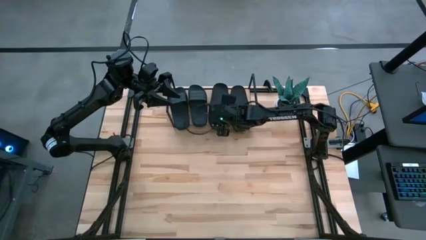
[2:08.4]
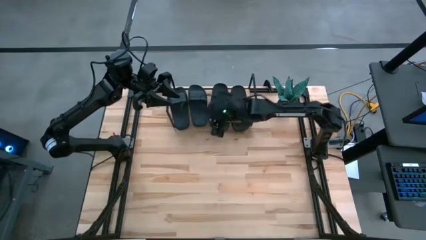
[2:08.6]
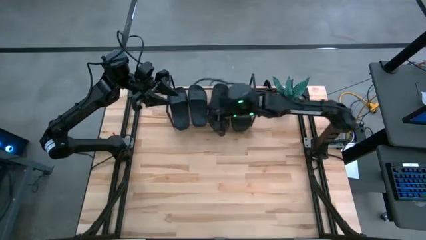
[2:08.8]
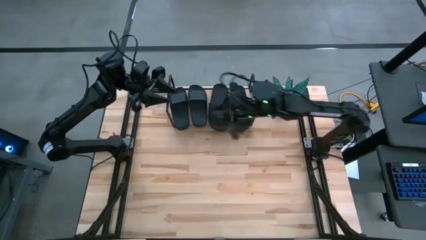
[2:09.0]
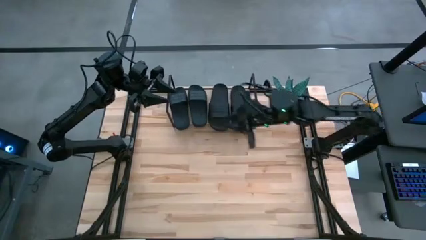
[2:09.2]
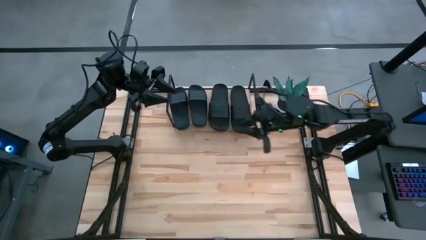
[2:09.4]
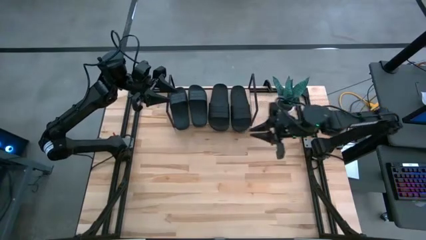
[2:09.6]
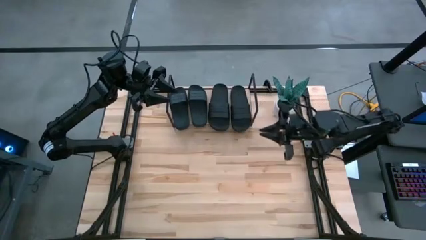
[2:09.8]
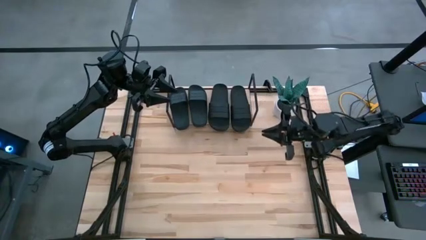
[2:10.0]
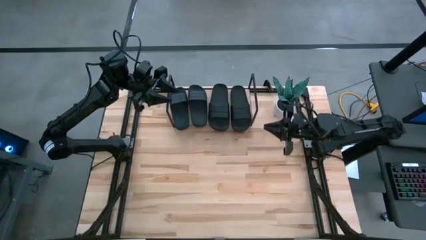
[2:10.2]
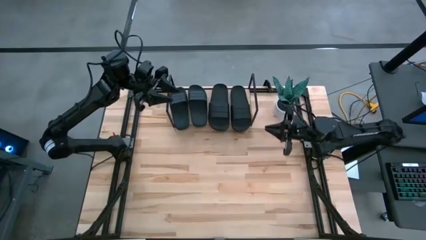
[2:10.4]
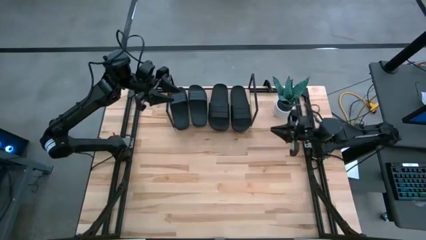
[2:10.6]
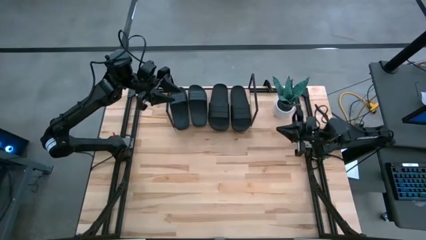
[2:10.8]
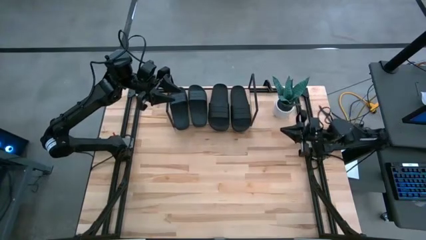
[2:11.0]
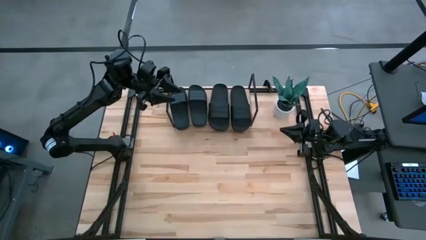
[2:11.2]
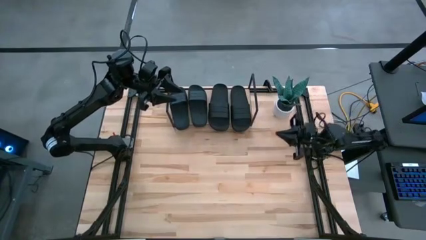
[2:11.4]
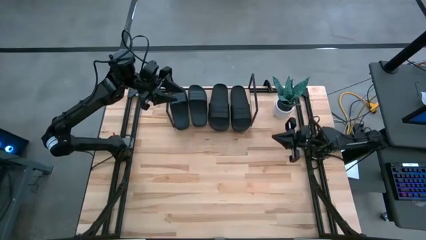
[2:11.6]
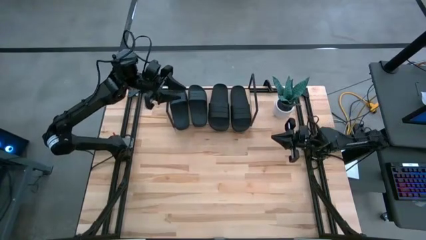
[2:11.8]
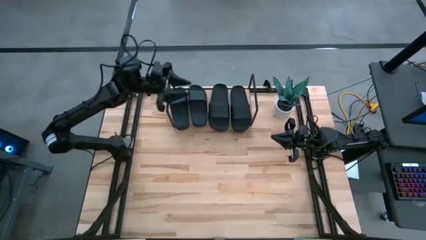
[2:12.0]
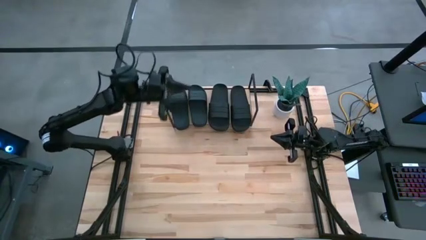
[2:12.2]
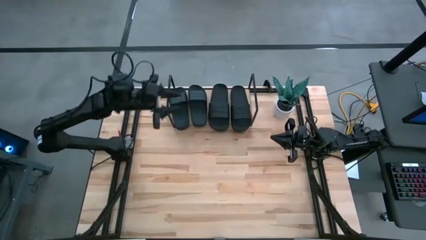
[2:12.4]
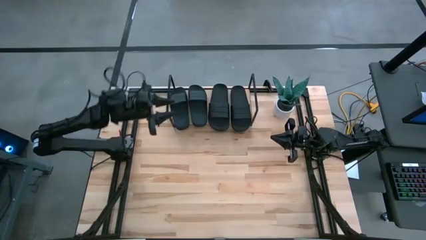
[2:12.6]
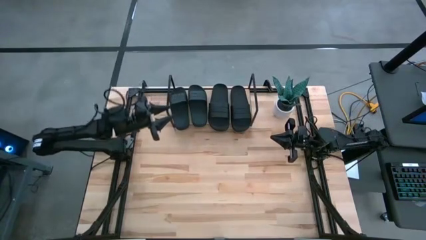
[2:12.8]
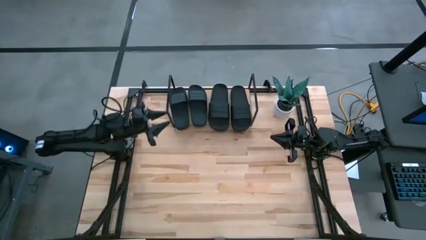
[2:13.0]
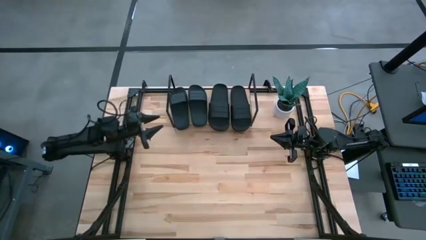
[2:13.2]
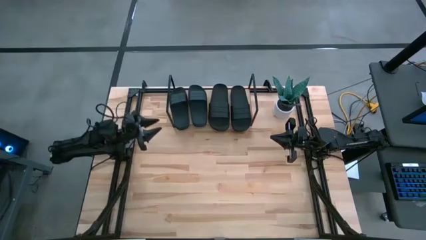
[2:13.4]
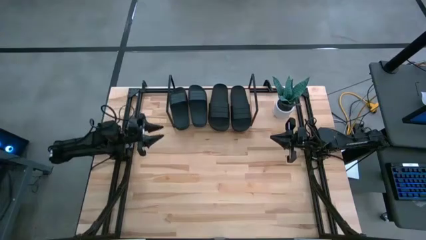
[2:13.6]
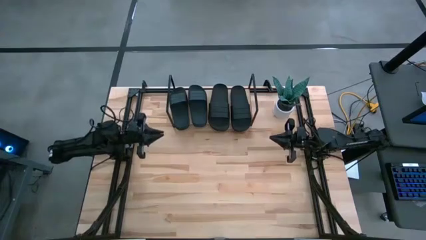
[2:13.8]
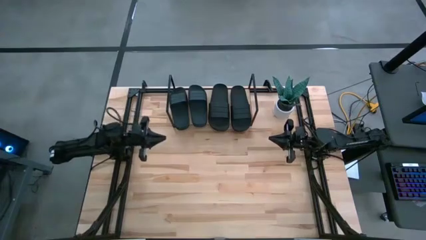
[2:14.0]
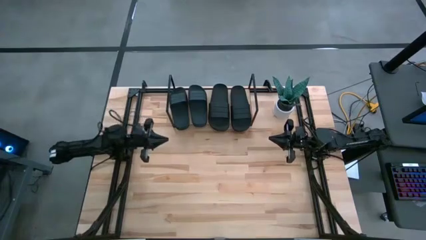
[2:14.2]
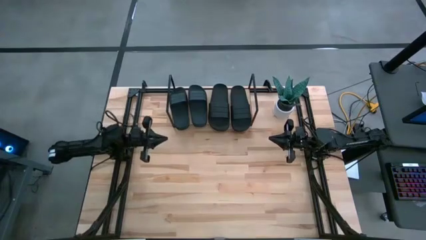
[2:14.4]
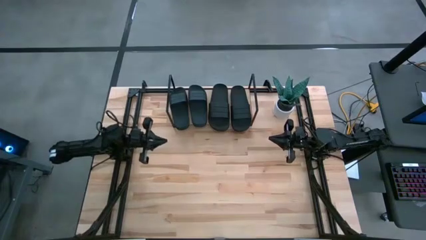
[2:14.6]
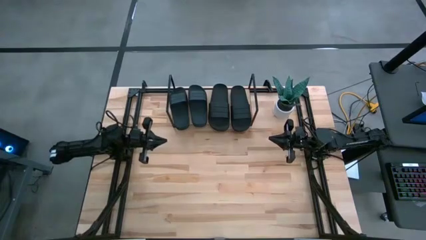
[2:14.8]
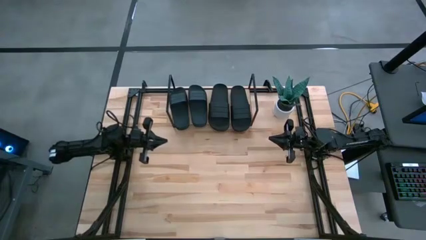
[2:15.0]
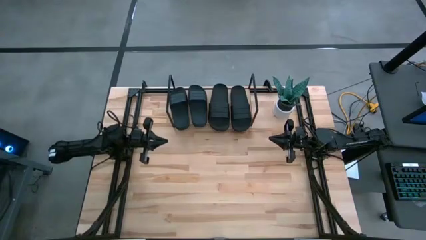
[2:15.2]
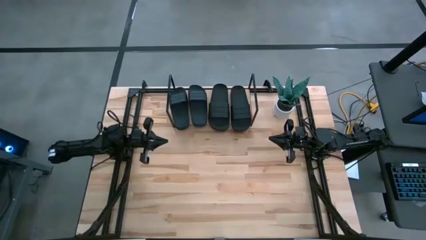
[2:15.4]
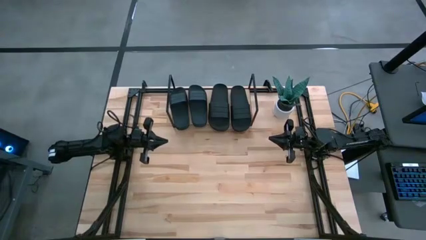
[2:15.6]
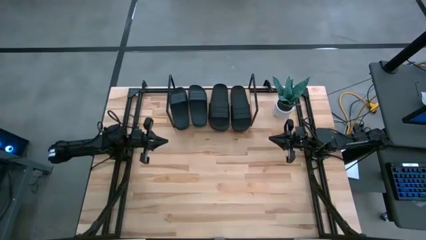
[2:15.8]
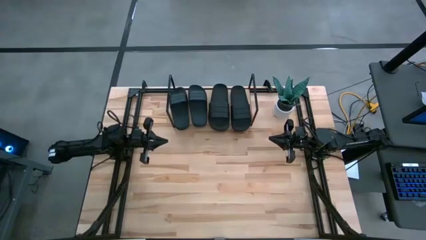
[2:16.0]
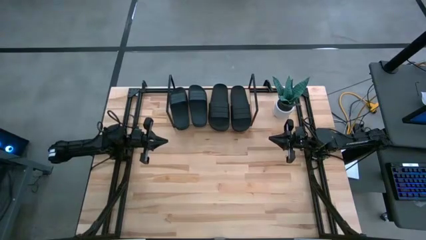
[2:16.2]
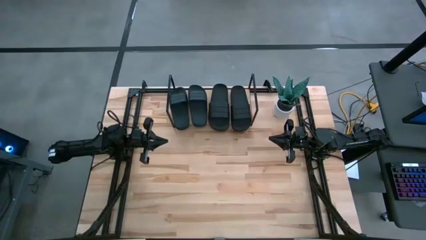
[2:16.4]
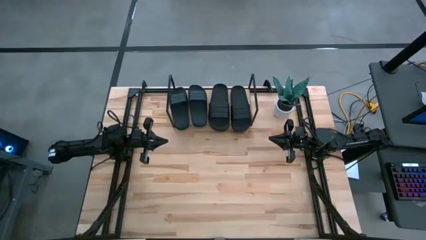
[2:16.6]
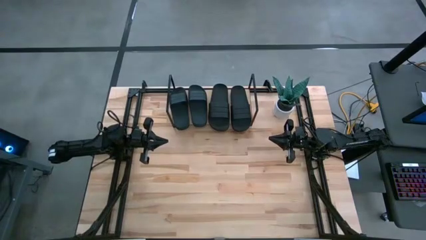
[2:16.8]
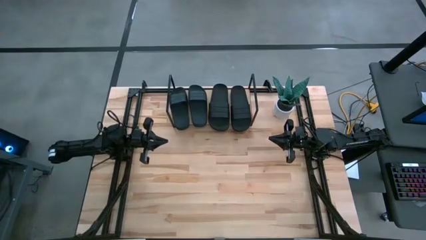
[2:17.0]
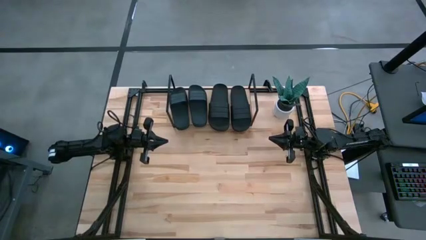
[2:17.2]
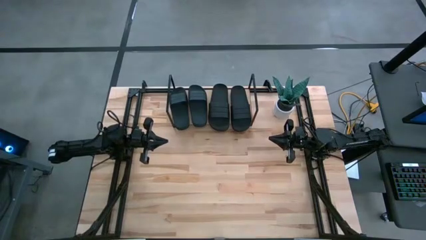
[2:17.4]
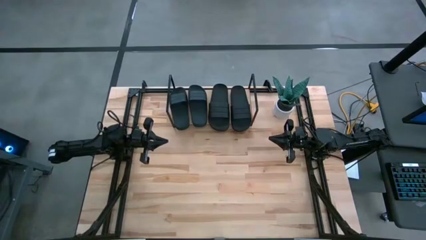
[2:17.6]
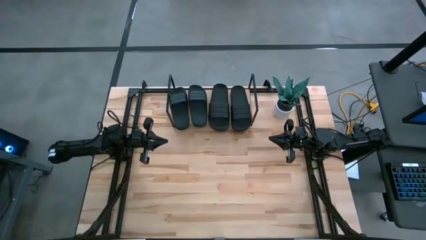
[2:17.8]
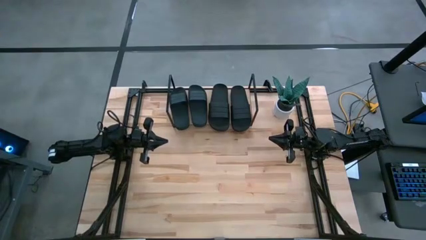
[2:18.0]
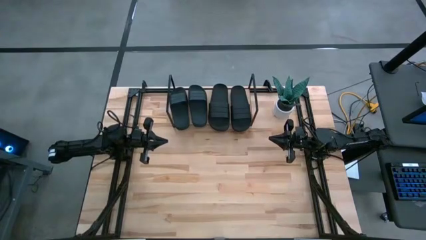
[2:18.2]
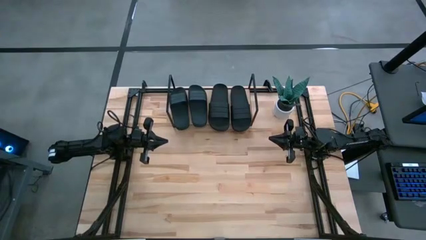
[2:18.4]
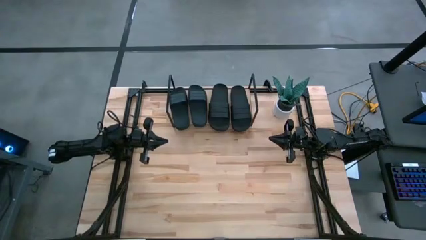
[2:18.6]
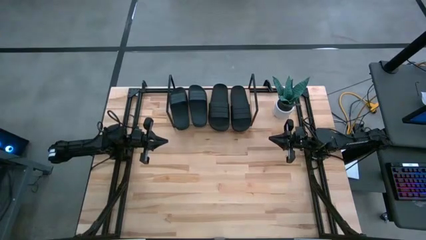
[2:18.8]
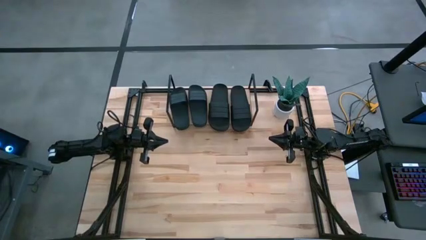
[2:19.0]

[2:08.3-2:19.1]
Task: Pick and place slides into the shelf
Return to Home Position

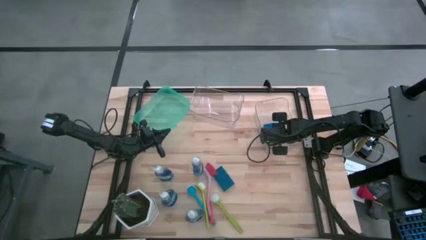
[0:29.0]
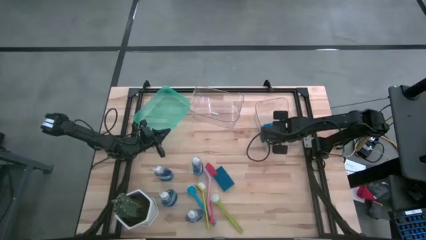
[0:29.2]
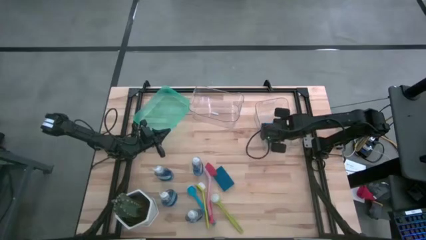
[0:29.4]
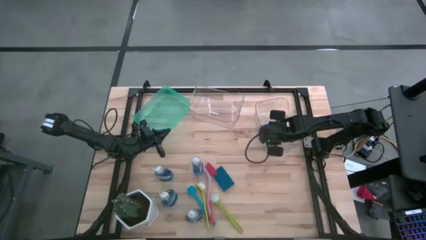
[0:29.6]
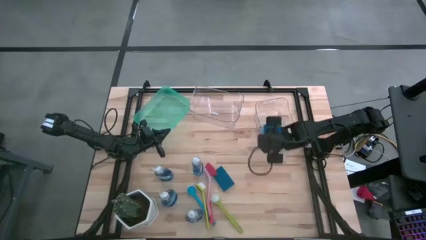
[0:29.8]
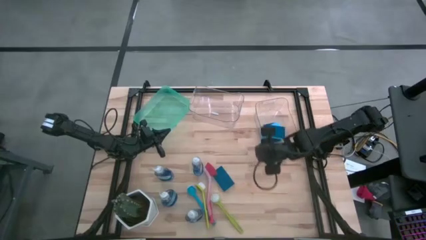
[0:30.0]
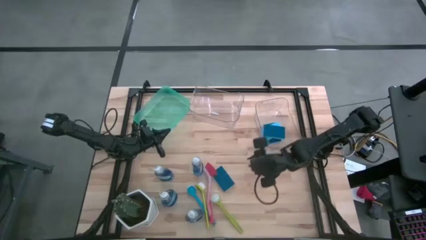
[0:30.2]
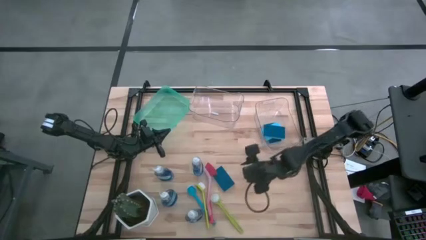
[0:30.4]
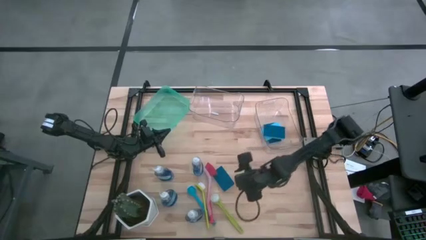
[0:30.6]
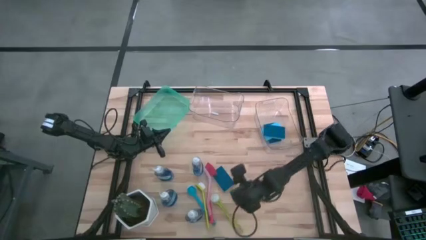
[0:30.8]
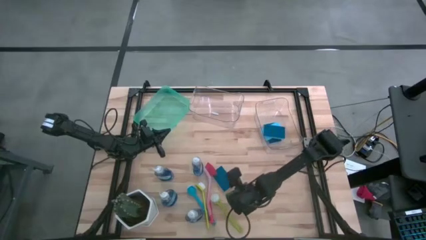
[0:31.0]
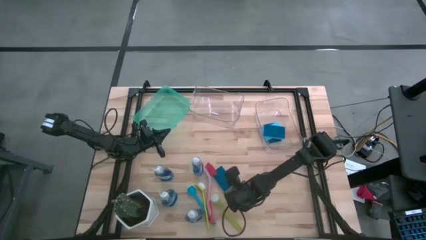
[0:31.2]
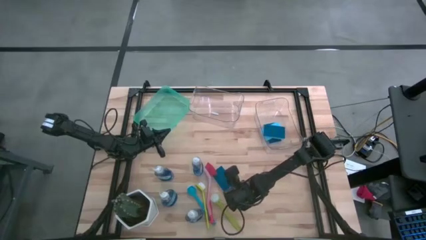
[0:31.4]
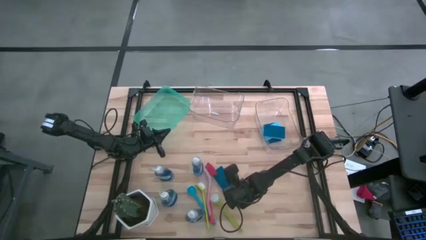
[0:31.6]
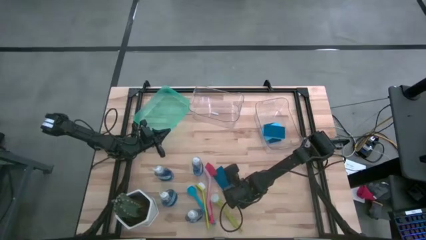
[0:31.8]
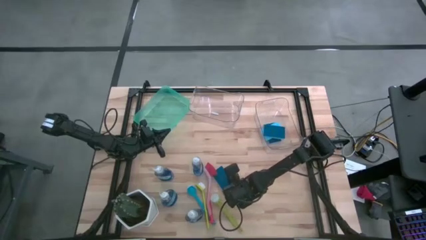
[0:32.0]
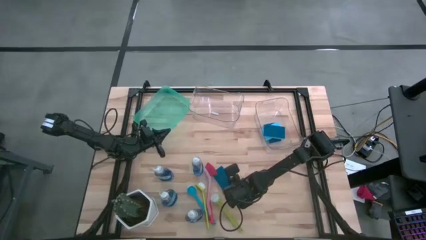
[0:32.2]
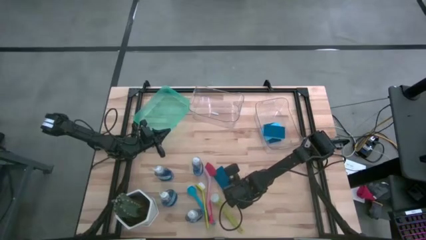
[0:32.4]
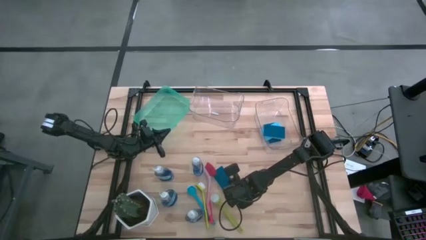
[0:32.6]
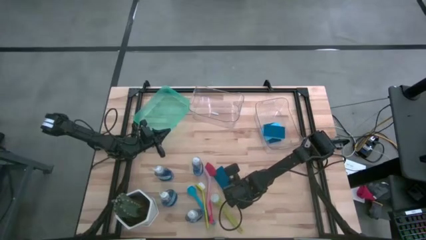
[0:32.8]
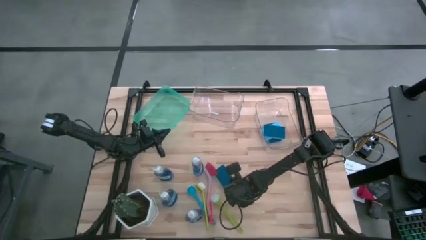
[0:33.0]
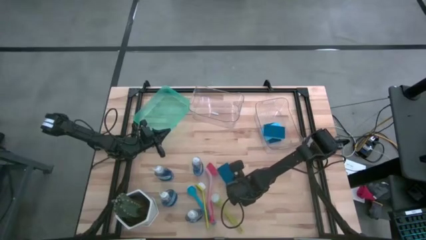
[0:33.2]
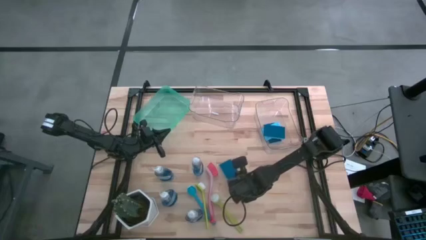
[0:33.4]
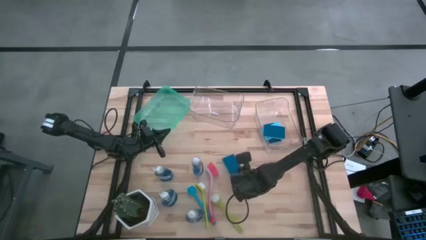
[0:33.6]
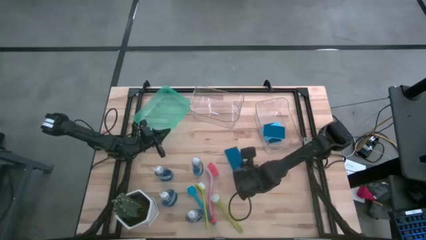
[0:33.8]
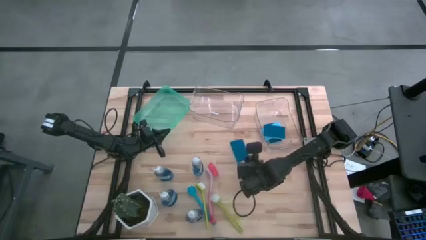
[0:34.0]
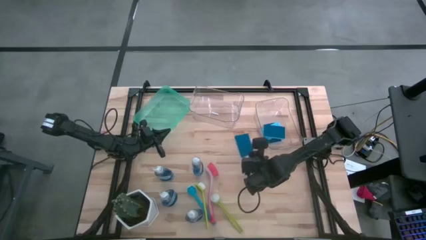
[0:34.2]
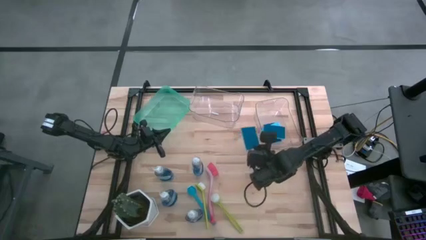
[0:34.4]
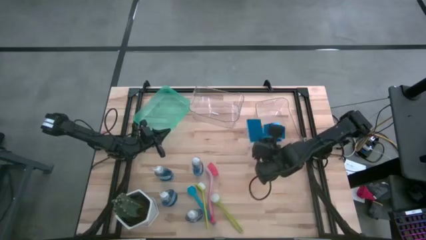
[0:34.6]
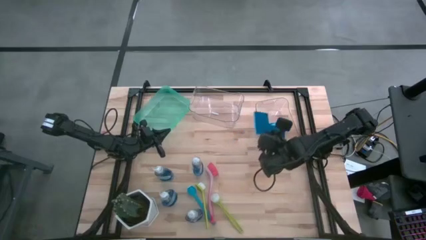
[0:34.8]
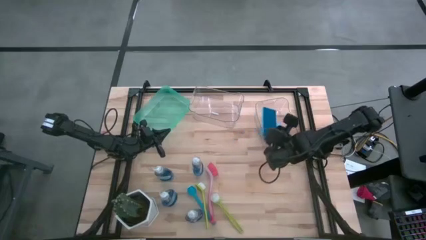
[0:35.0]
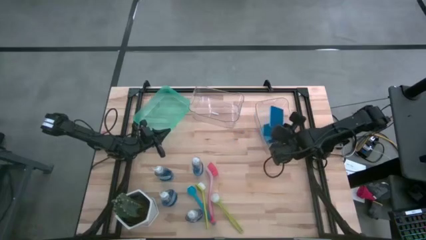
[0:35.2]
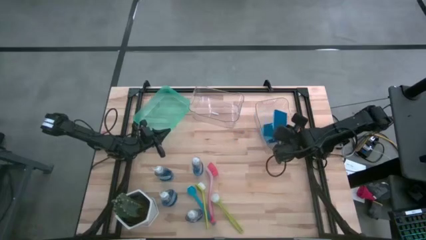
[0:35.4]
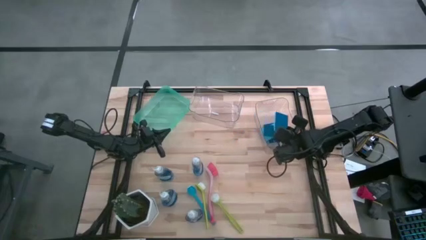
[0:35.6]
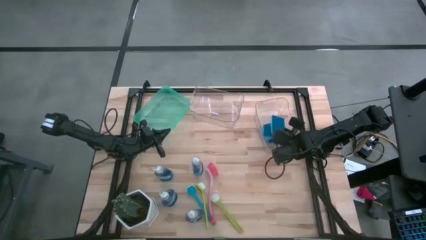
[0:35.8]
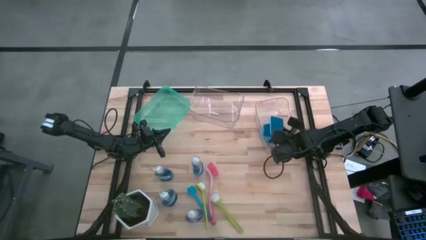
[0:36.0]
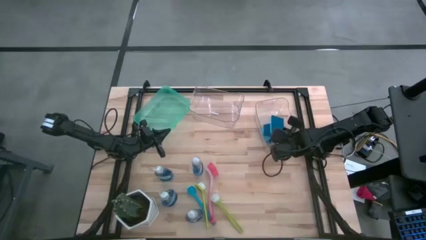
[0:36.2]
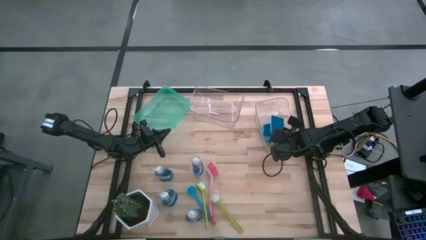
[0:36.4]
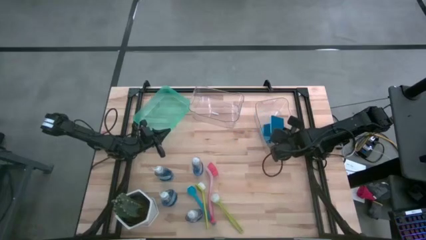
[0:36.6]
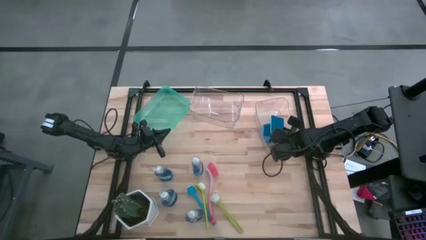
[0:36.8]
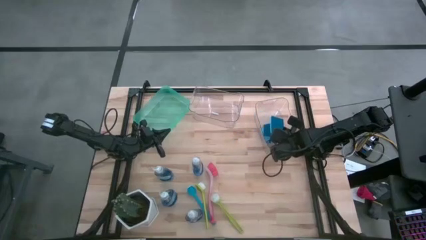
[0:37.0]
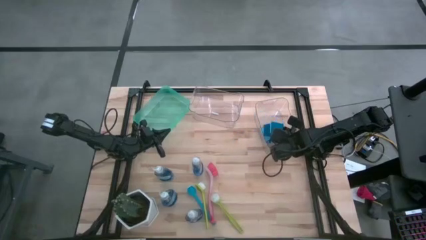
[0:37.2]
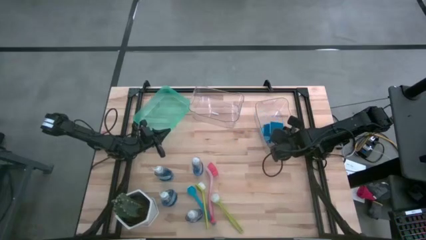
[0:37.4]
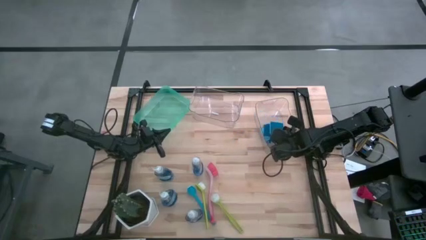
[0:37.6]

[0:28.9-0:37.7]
Task: Pick & Place Kitchen Sink Supplies
Put the blue sponge in the right transparent bin
